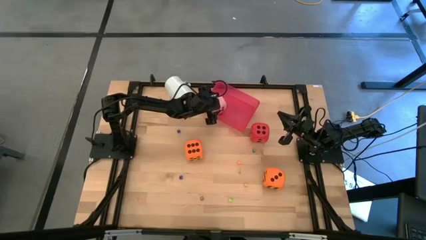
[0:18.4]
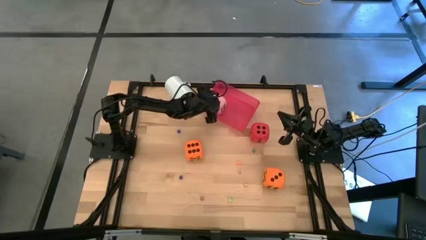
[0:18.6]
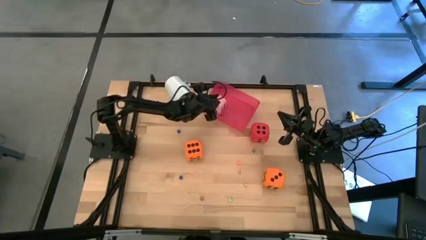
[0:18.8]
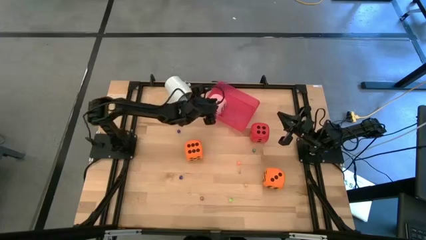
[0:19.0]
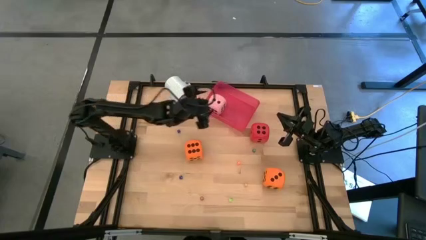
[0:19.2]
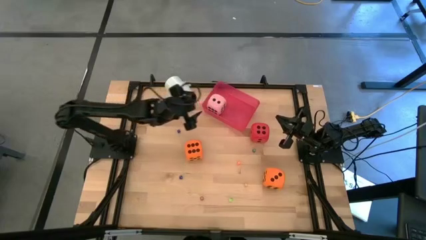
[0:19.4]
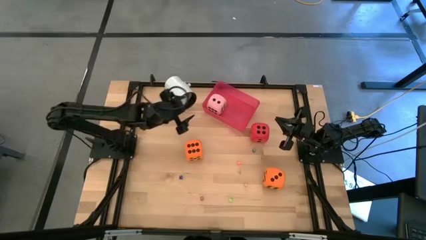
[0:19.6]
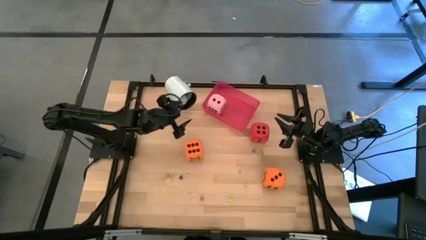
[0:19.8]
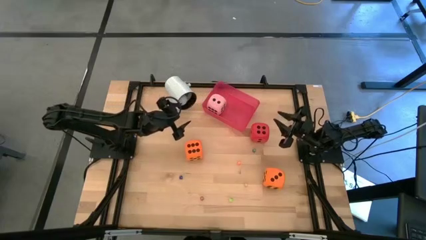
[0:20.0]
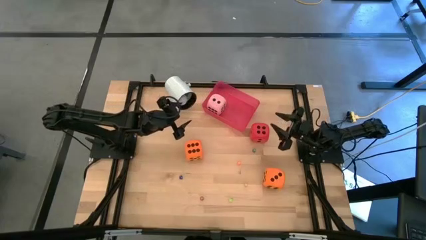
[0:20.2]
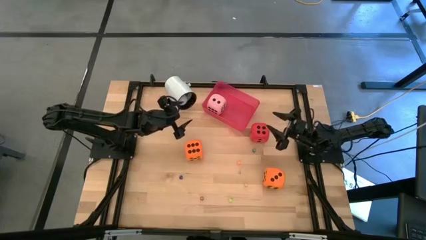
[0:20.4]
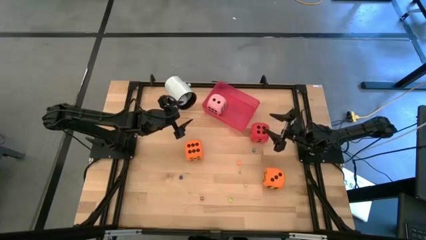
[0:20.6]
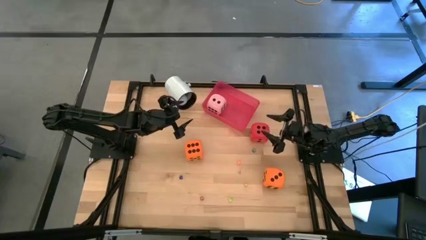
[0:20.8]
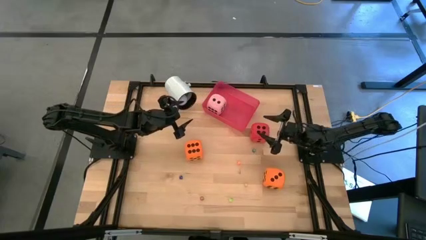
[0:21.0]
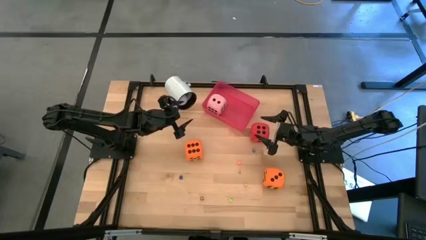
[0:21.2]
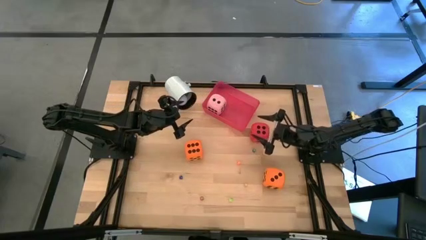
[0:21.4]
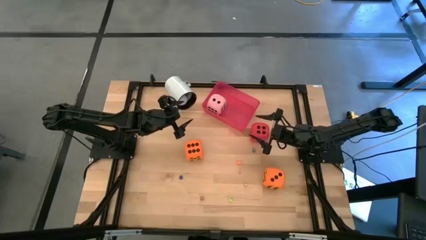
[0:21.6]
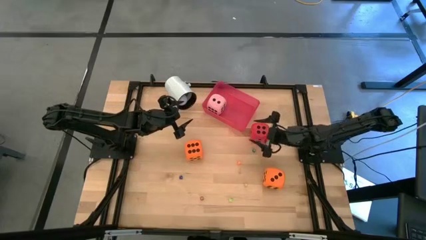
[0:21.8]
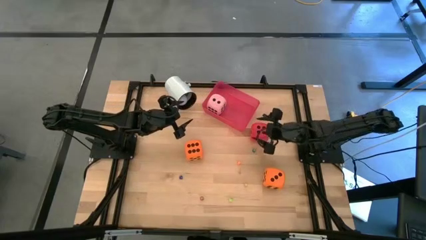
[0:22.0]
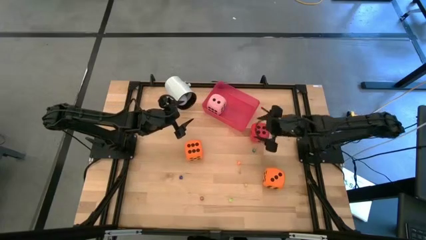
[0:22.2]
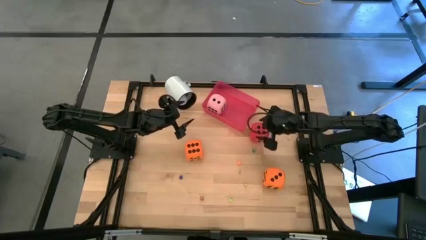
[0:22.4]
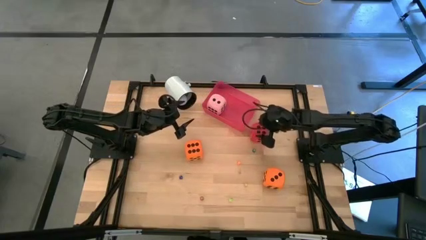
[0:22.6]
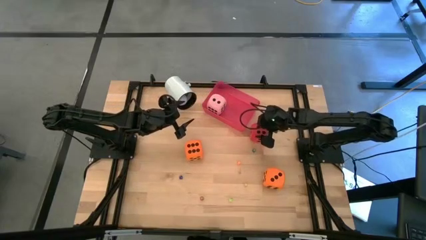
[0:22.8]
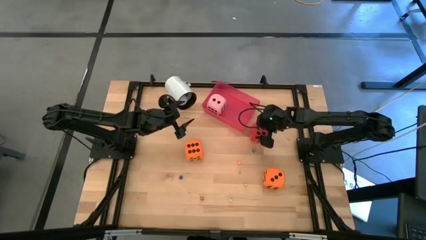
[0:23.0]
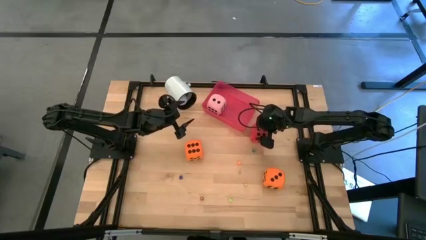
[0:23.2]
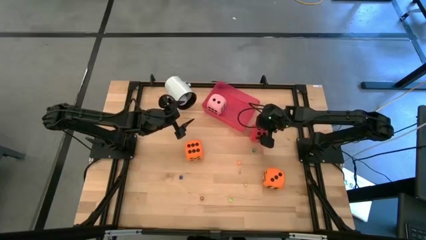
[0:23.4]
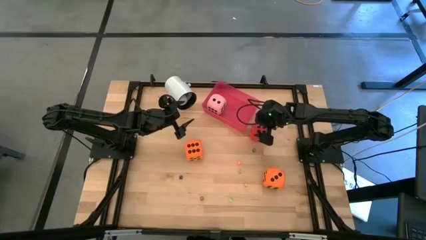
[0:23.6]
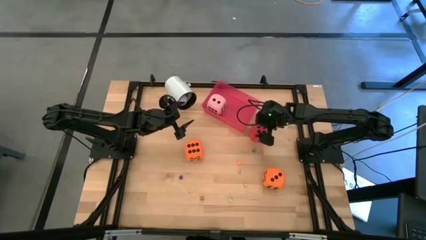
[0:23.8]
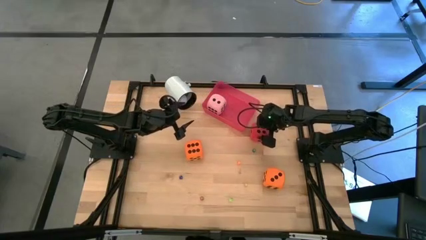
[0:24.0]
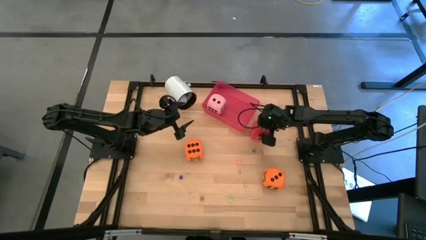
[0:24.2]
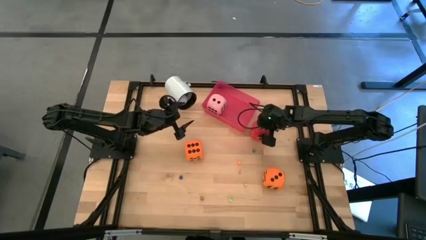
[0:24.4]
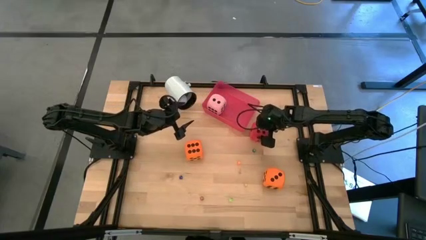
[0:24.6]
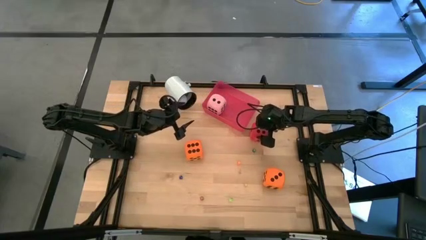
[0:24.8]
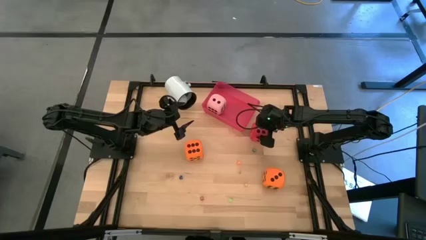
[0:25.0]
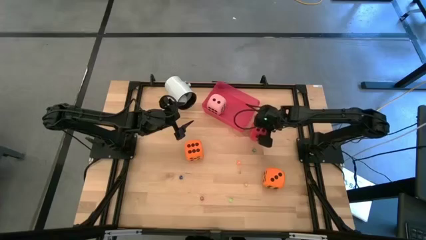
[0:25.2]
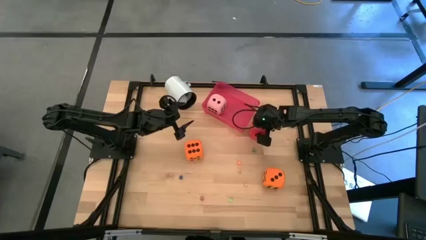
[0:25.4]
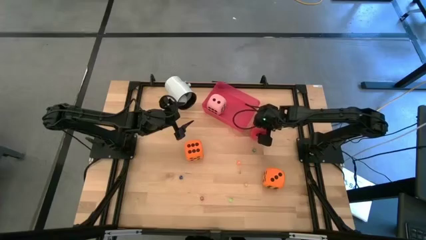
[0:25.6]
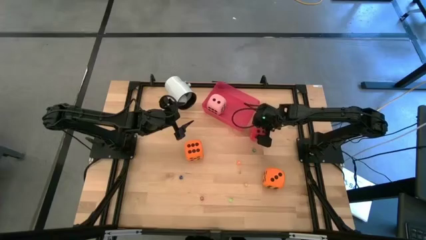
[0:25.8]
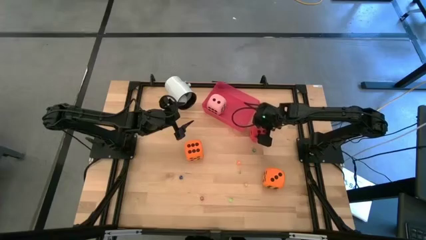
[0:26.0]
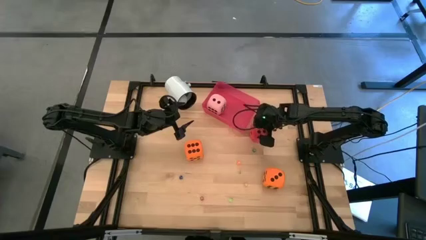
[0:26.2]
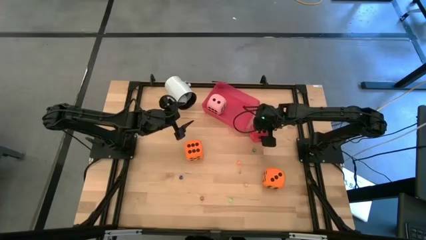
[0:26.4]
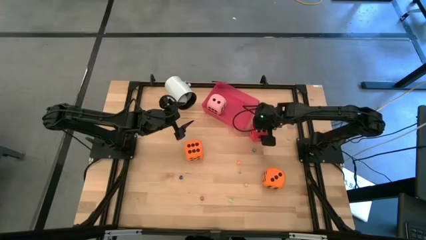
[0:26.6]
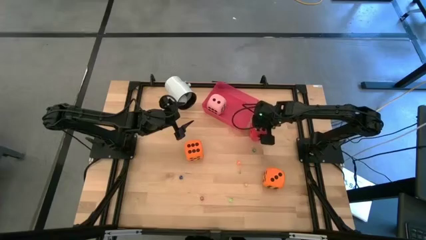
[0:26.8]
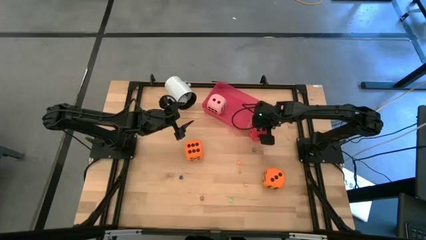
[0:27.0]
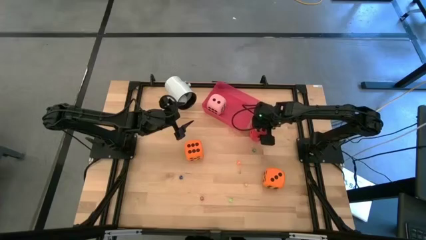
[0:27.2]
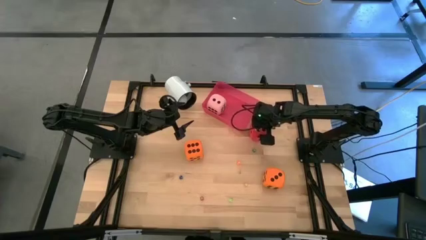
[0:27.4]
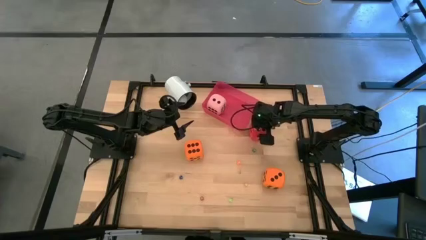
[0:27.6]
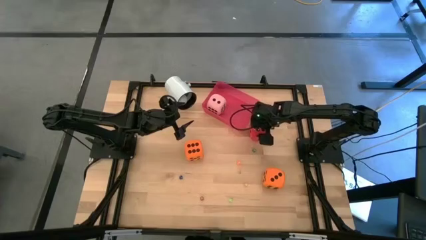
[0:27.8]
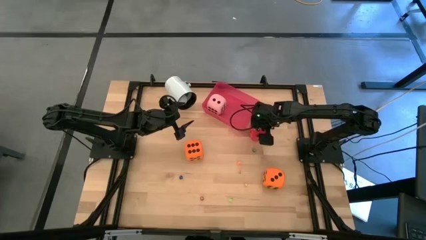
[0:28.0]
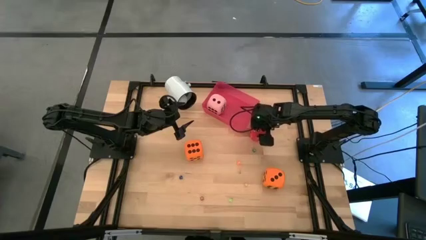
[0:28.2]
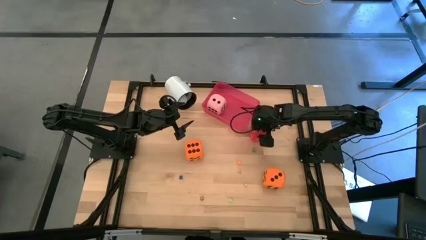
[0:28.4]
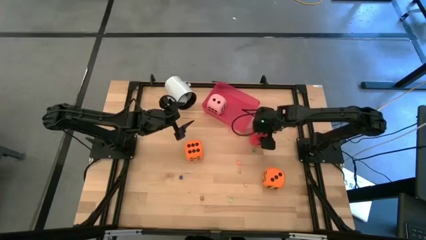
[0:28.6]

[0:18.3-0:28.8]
Task: Pick & Place Dice
Put the big red die into the red bin

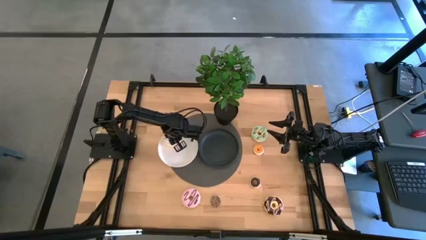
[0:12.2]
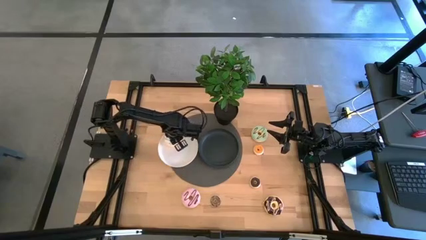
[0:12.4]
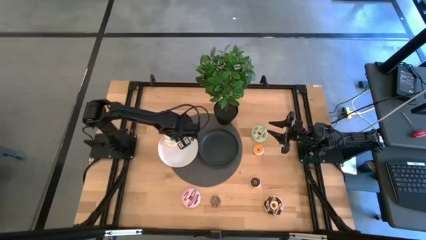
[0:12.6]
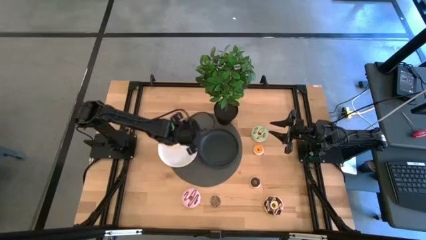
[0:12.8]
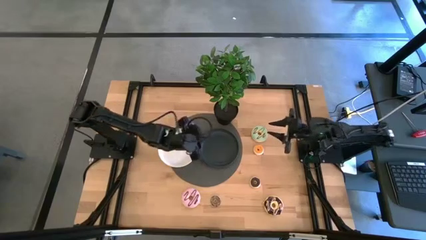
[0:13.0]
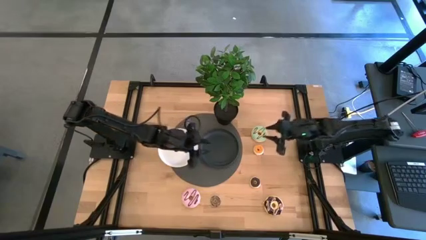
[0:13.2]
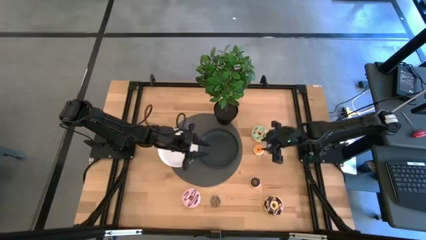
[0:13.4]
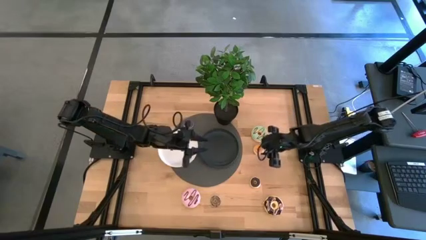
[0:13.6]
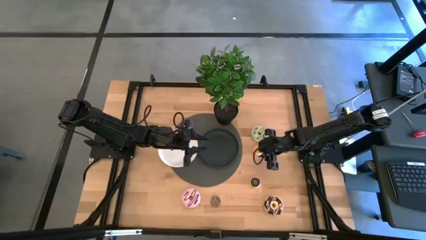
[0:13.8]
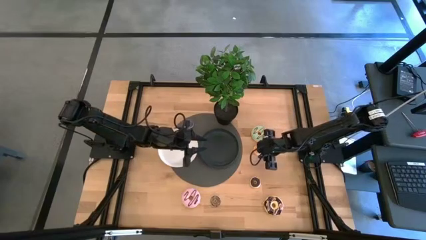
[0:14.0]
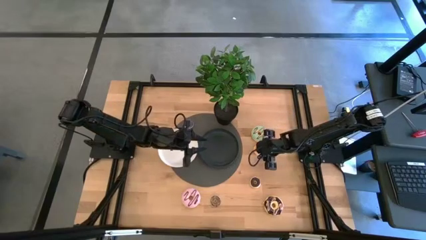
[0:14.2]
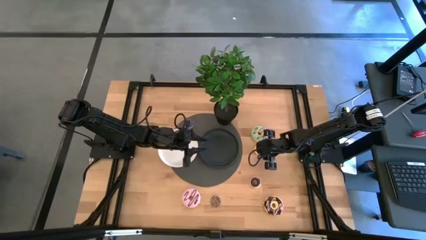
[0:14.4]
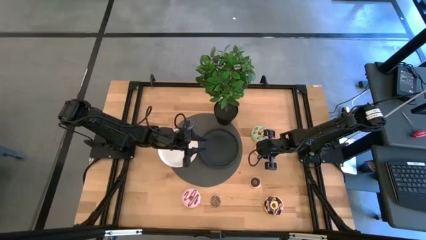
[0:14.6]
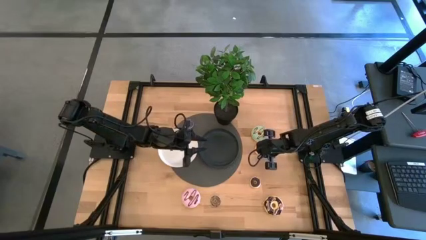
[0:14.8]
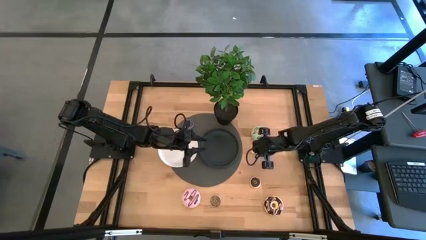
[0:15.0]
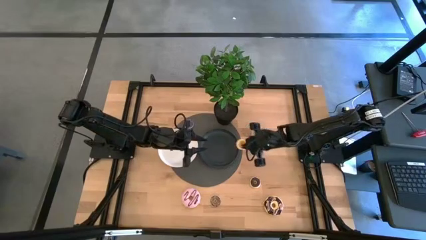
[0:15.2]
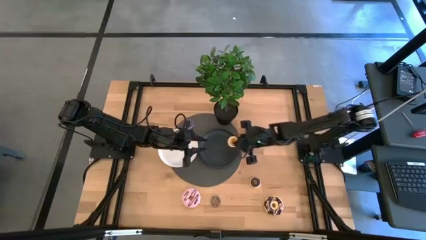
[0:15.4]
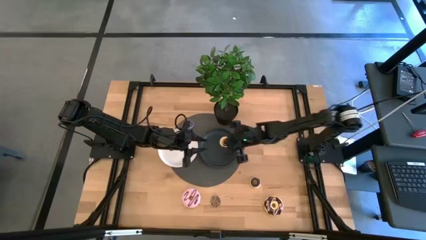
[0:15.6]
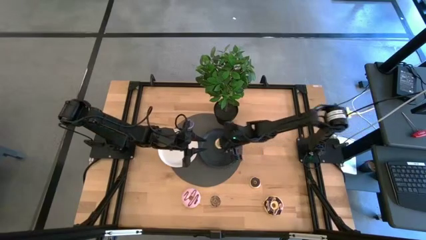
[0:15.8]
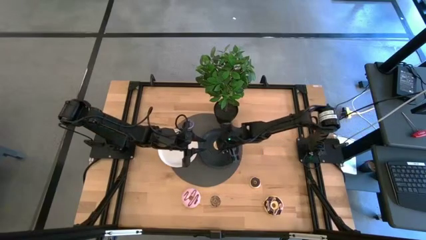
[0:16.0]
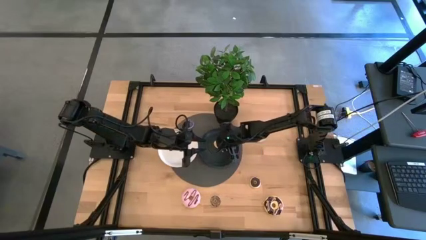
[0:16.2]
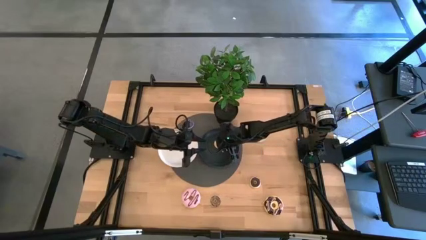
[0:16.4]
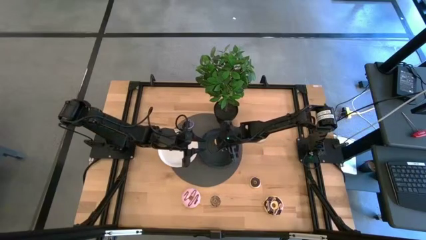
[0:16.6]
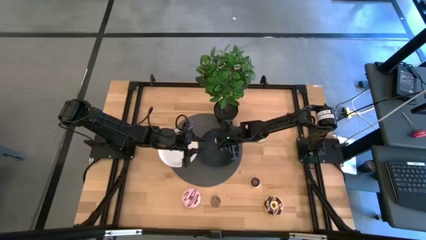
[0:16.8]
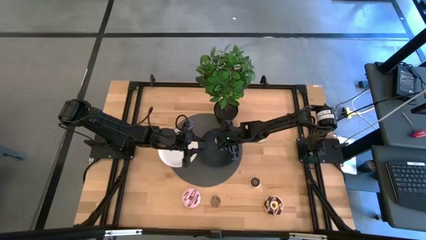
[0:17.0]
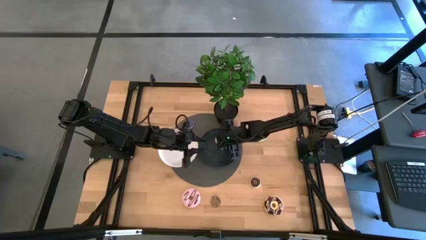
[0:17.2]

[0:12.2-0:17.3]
Task: Pick & Place donuts
Put the small orange donut on the black plate
